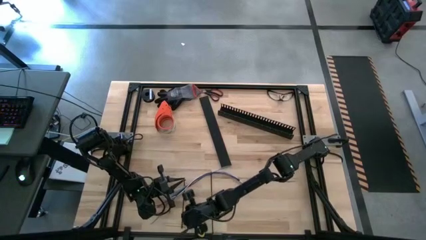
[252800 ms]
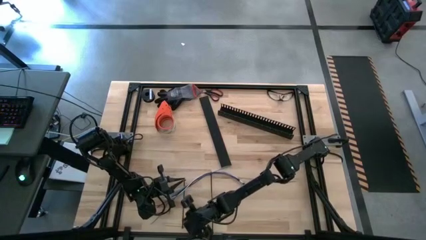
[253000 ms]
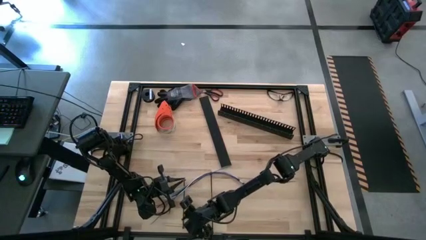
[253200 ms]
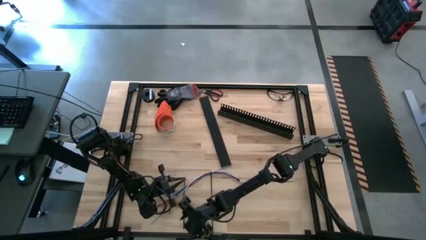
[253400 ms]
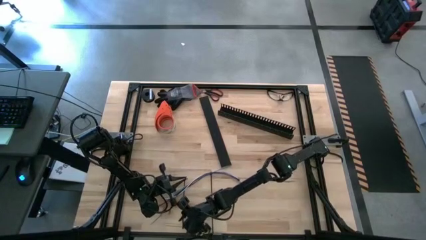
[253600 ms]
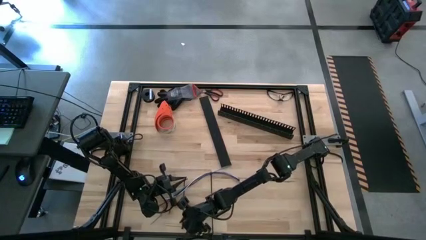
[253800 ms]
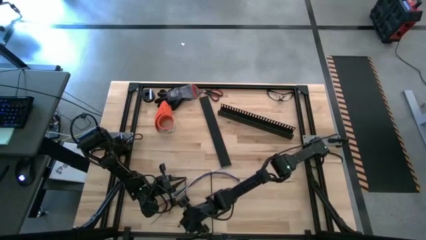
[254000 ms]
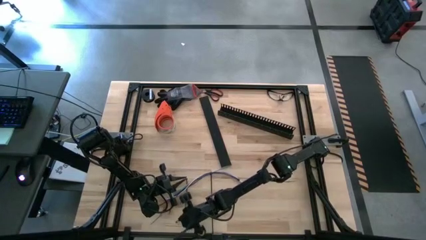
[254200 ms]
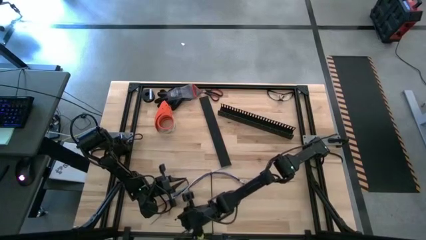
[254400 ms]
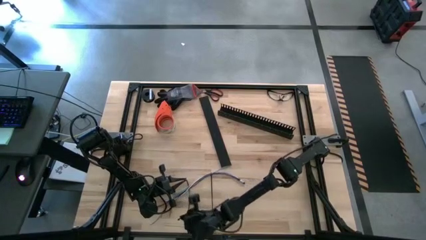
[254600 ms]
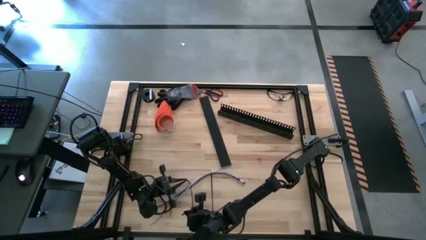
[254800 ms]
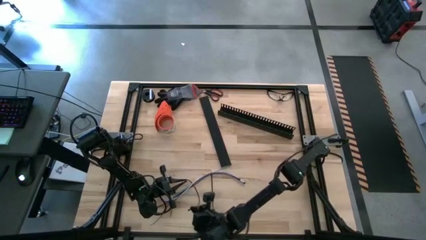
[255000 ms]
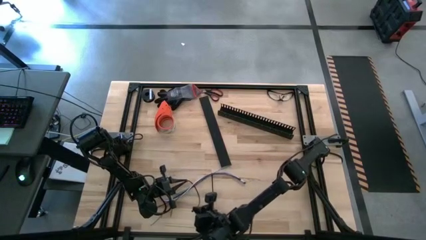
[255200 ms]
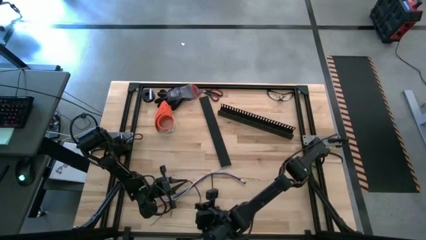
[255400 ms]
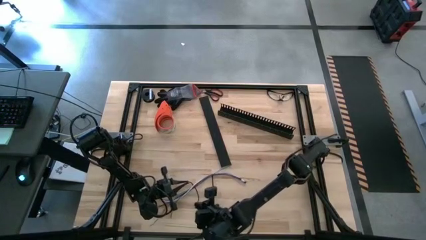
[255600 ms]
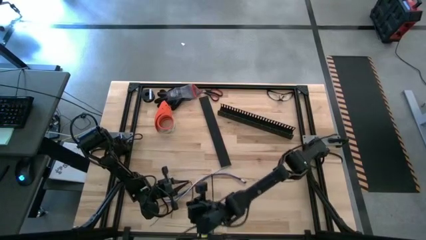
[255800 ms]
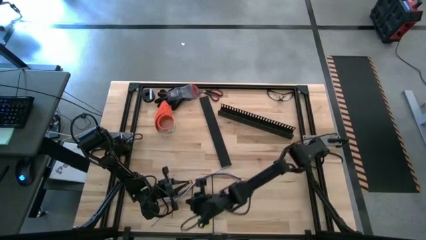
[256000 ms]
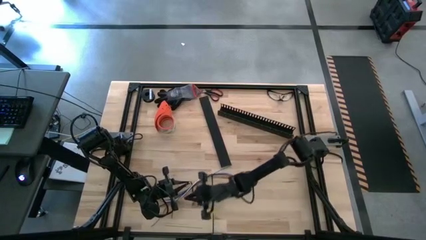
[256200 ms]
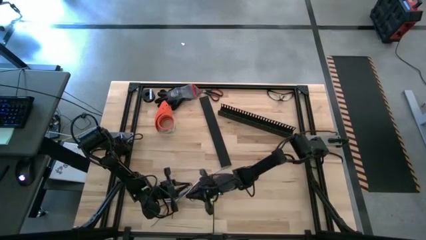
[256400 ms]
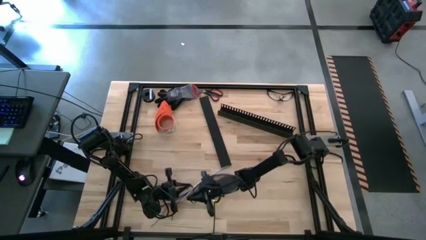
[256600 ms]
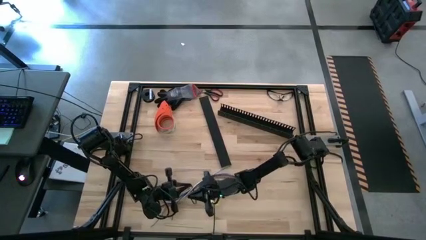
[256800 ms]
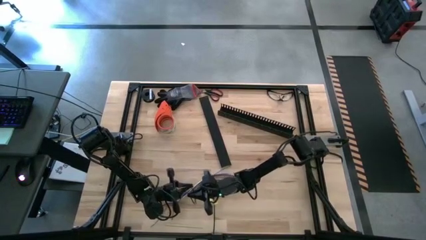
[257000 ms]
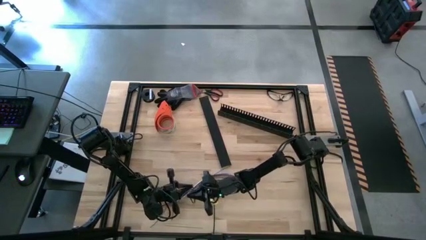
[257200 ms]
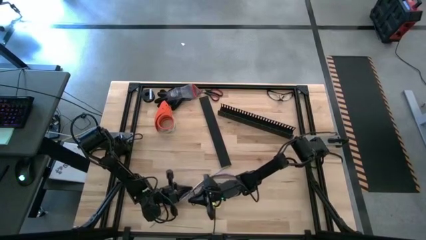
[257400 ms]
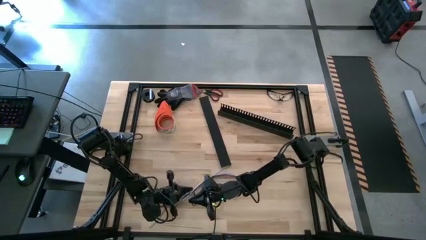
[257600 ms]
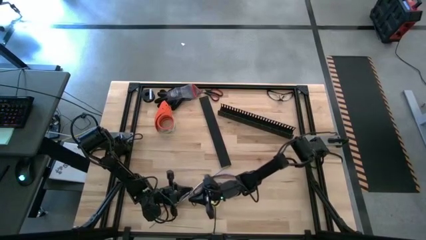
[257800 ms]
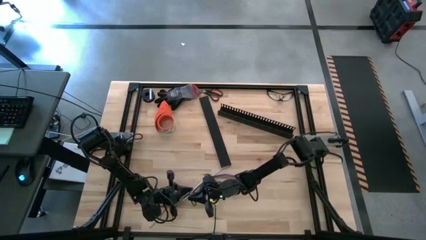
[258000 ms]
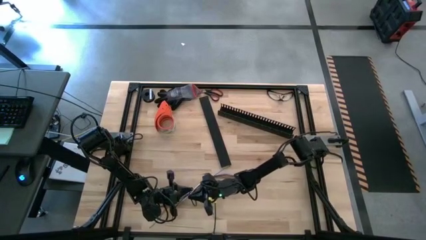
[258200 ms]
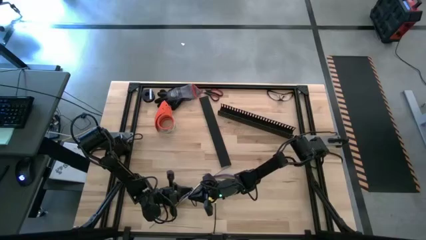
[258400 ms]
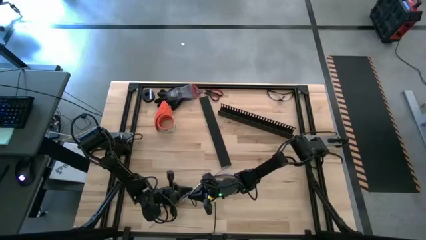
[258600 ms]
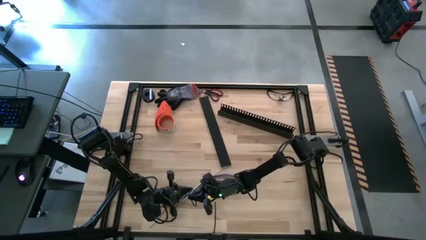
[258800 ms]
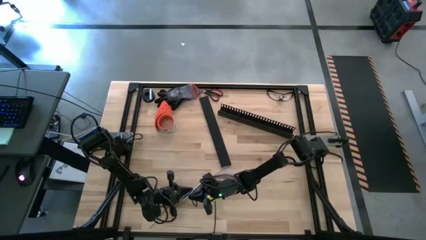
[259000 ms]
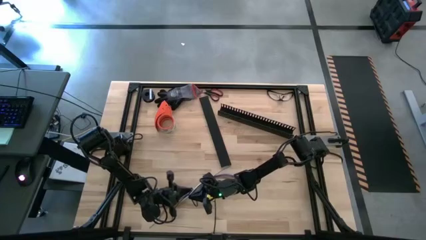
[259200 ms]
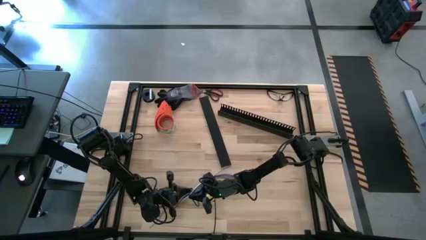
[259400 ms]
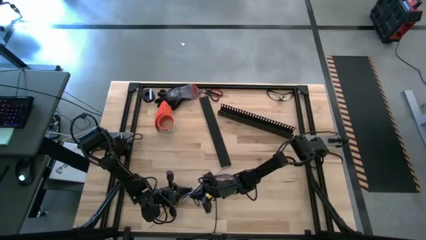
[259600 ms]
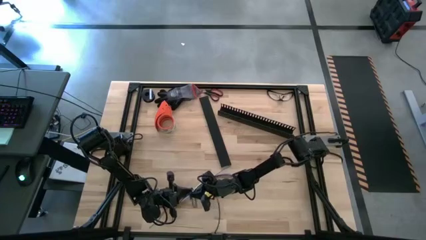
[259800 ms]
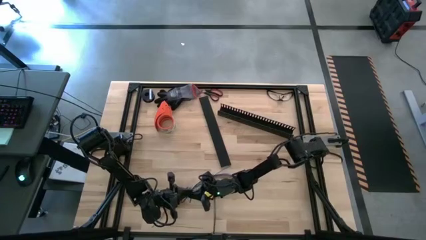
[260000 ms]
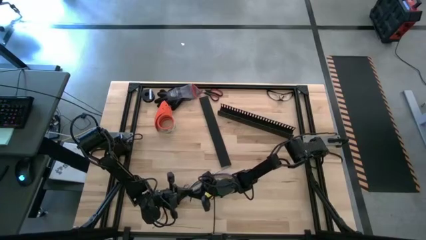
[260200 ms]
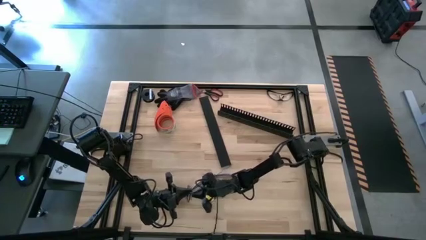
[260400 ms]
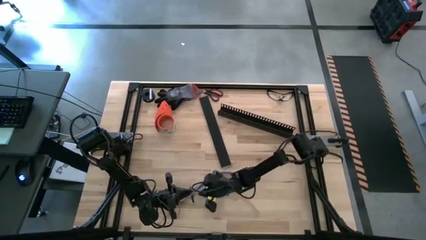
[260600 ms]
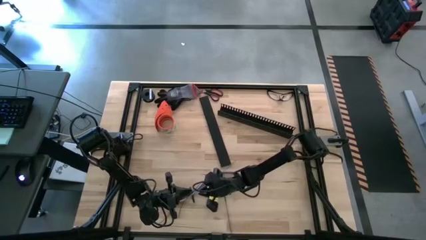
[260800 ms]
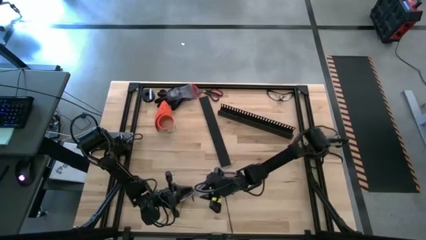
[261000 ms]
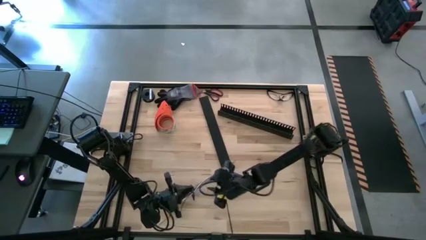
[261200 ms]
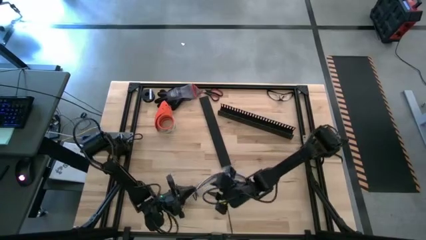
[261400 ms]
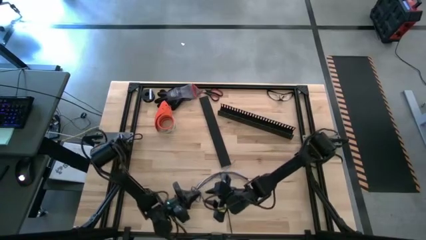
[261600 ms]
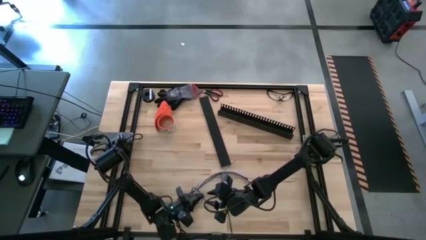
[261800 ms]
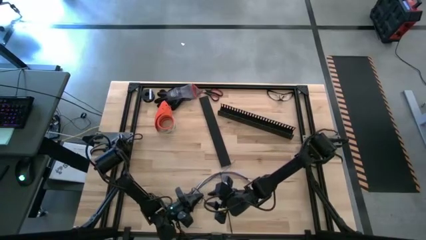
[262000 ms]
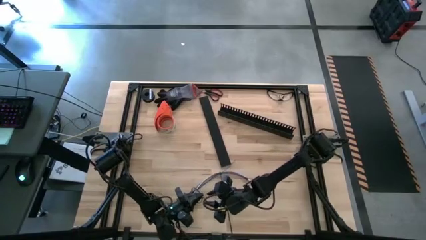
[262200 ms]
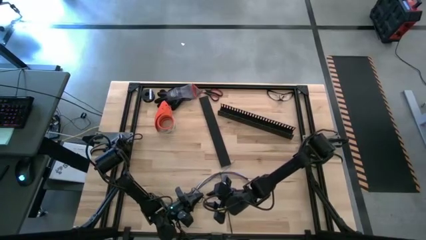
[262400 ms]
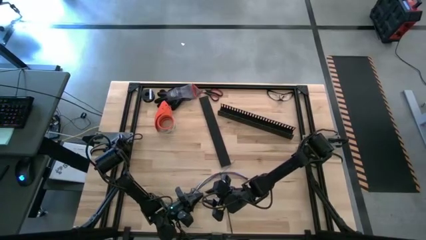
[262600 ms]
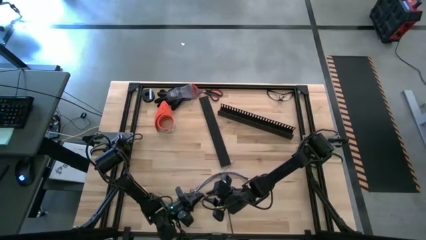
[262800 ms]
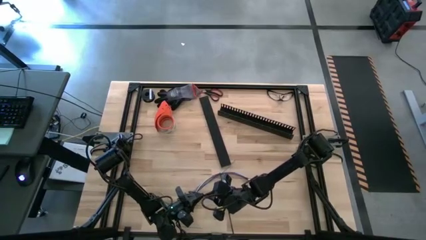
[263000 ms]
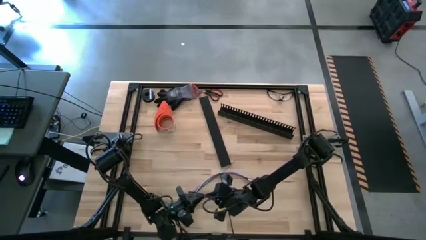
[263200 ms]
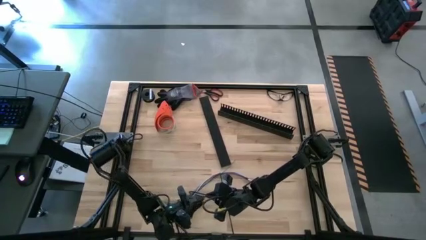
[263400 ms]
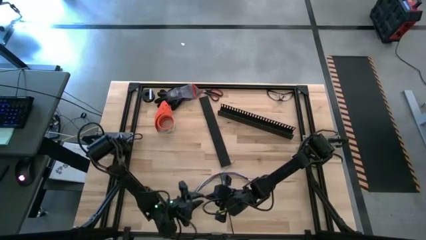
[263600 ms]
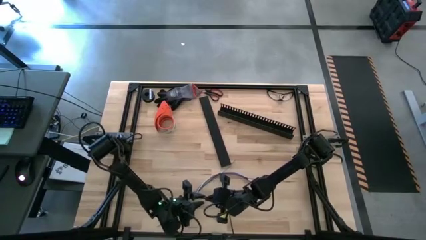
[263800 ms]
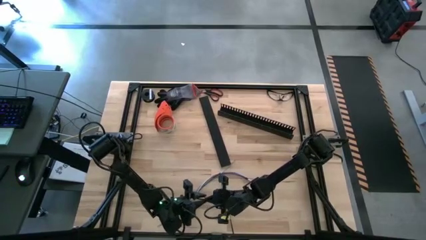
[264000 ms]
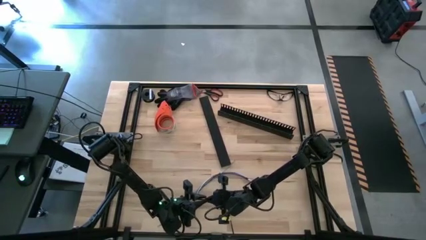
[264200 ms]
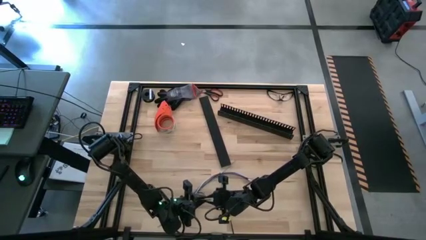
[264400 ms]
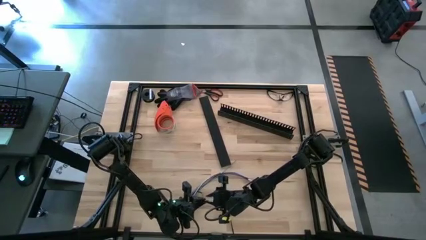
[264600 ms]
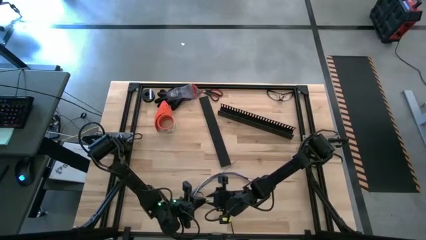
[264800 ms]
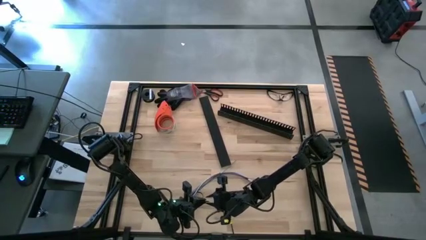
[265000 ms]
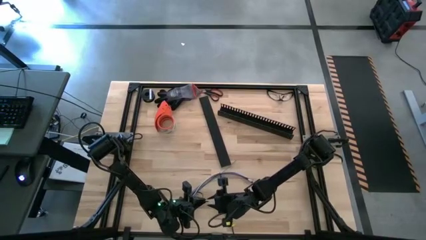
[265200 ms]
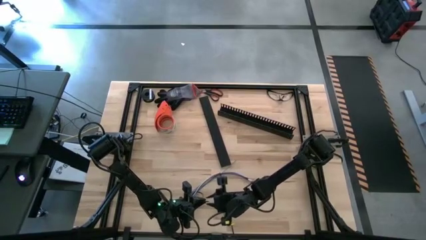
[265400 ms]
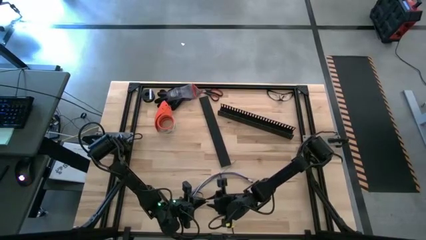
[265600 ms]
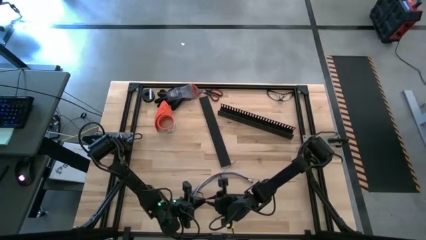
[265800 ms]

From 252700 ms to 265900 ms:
Task: Ziptie cables
Wrap the black zip tie on the cable
